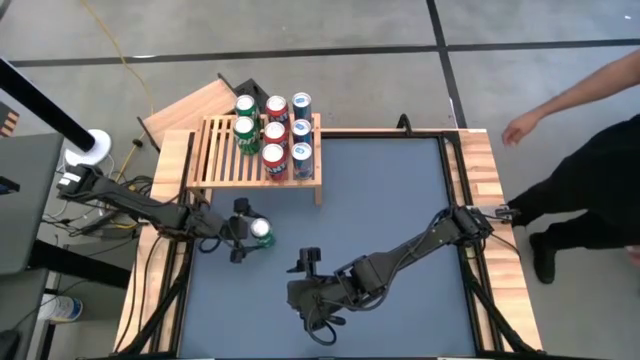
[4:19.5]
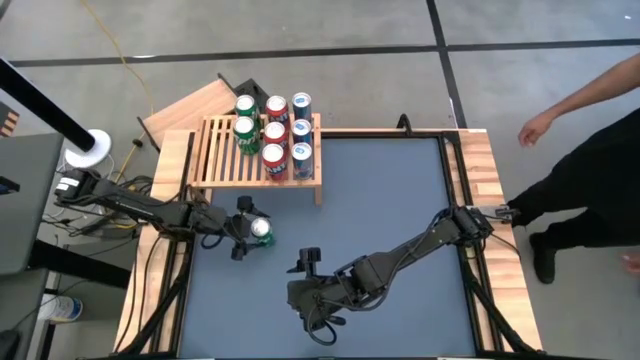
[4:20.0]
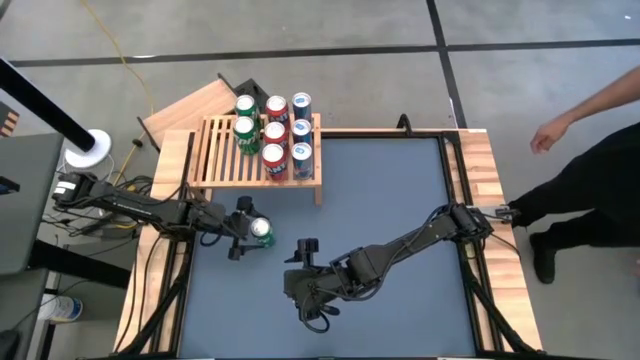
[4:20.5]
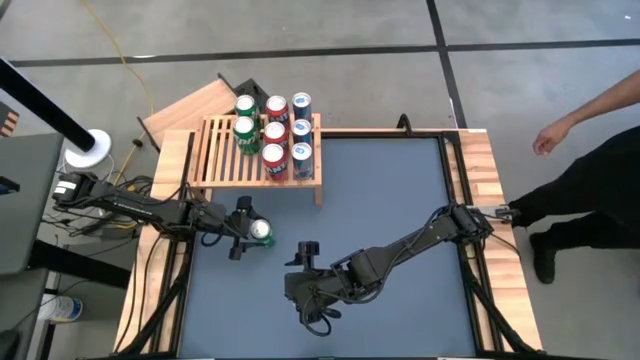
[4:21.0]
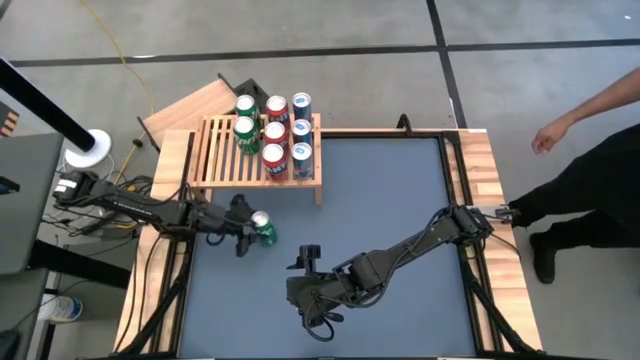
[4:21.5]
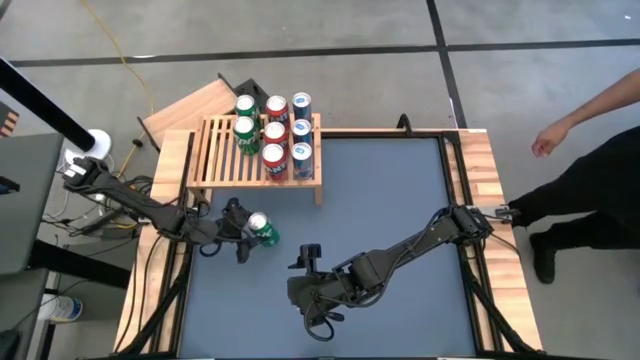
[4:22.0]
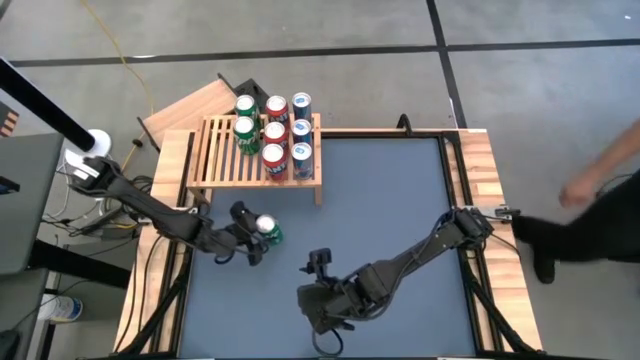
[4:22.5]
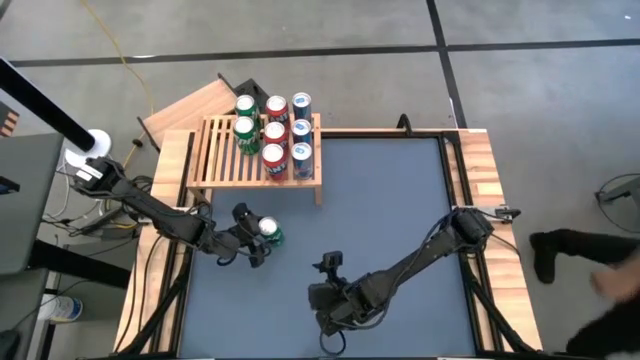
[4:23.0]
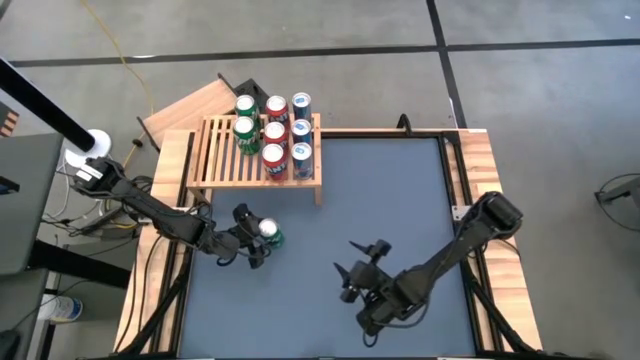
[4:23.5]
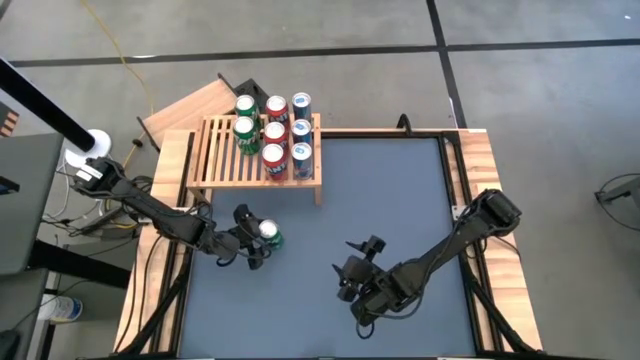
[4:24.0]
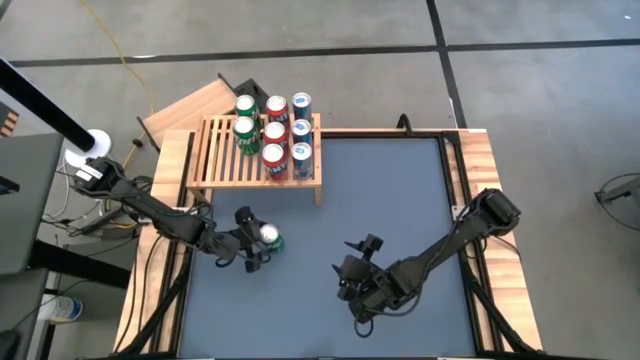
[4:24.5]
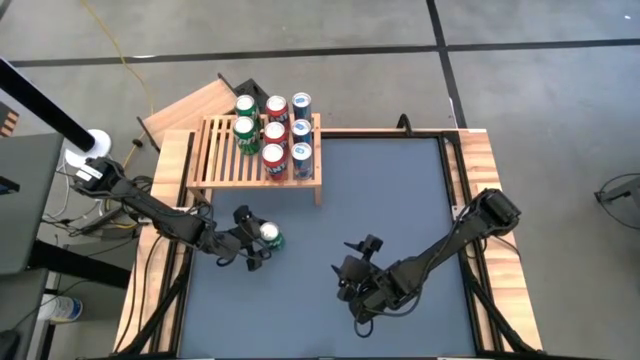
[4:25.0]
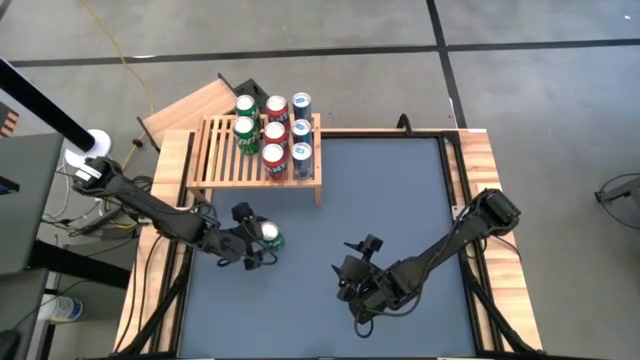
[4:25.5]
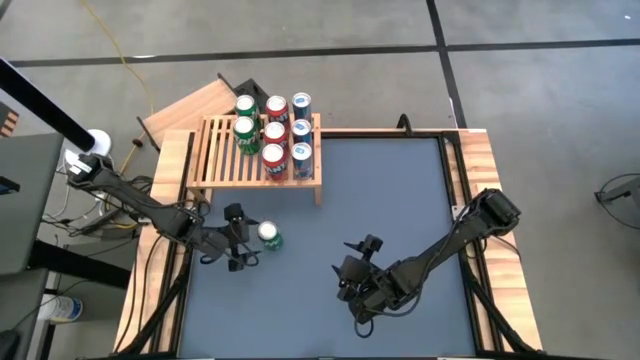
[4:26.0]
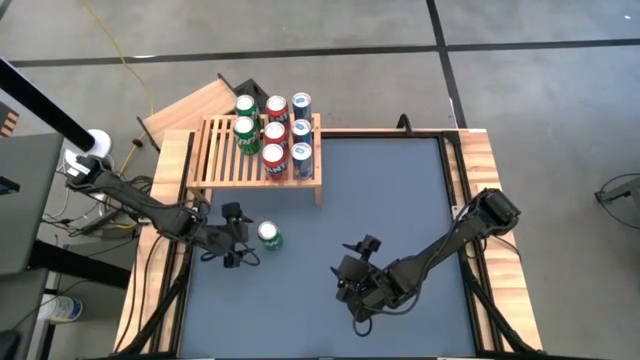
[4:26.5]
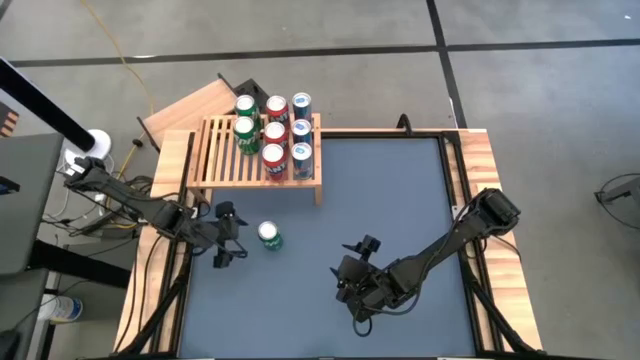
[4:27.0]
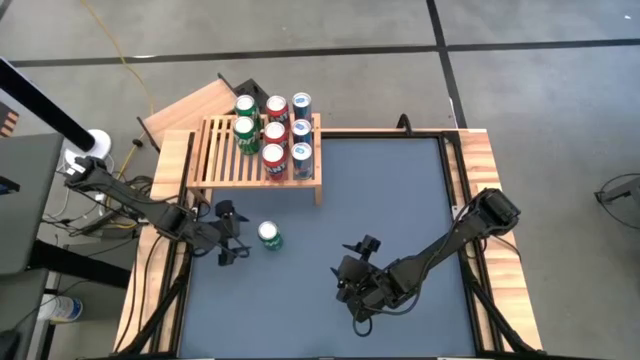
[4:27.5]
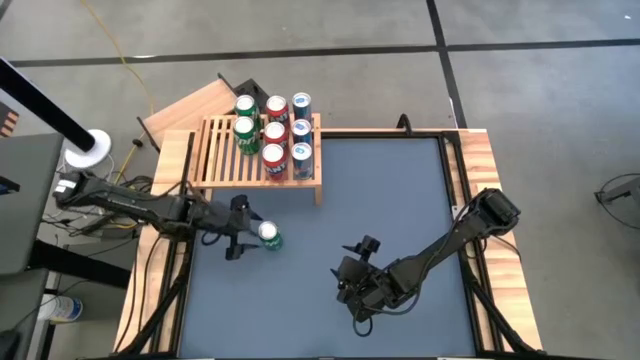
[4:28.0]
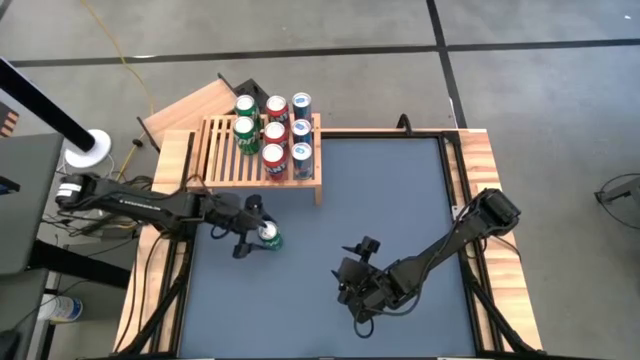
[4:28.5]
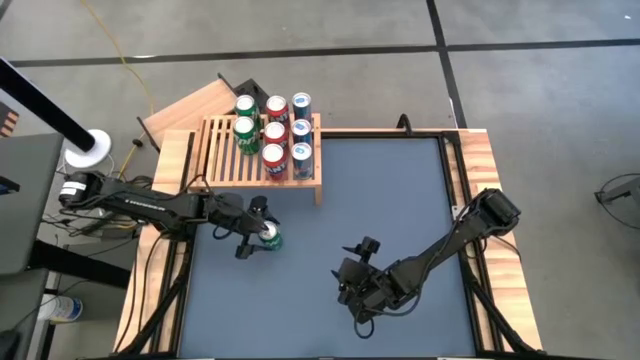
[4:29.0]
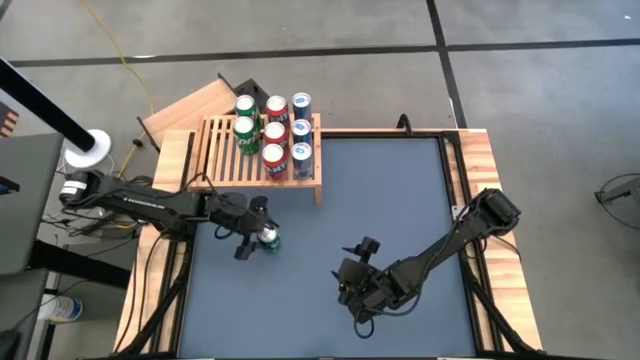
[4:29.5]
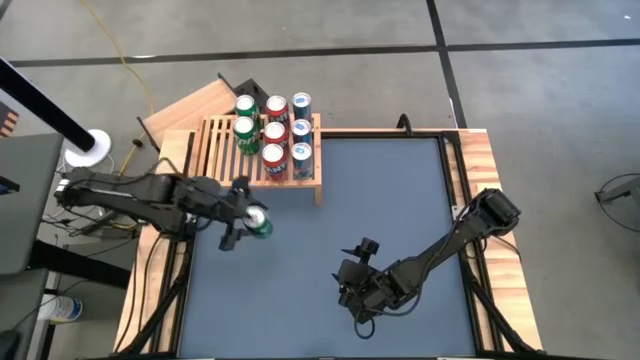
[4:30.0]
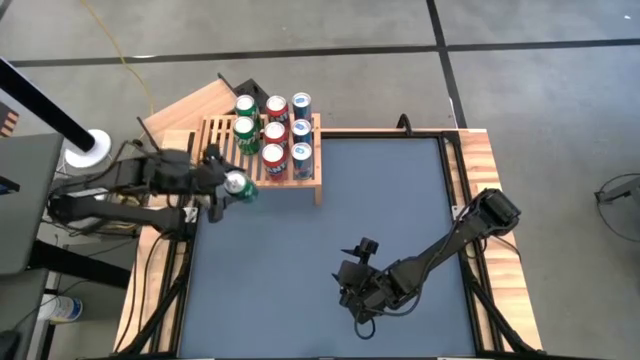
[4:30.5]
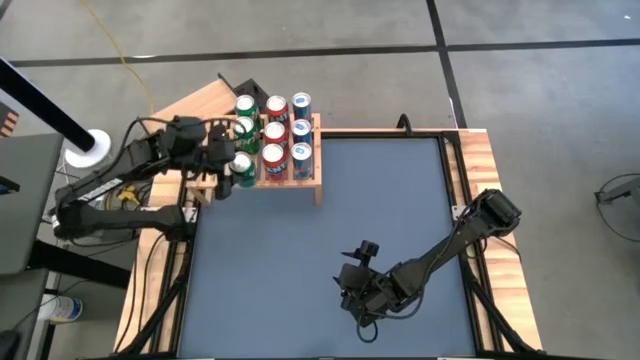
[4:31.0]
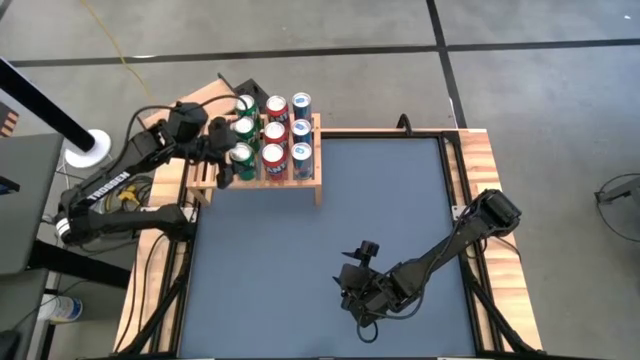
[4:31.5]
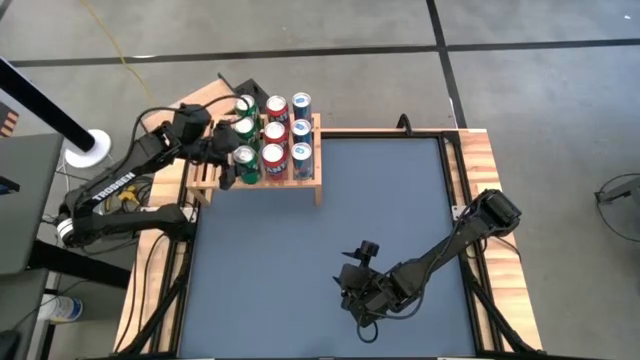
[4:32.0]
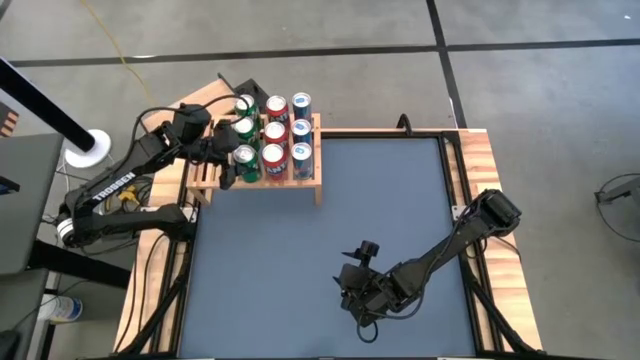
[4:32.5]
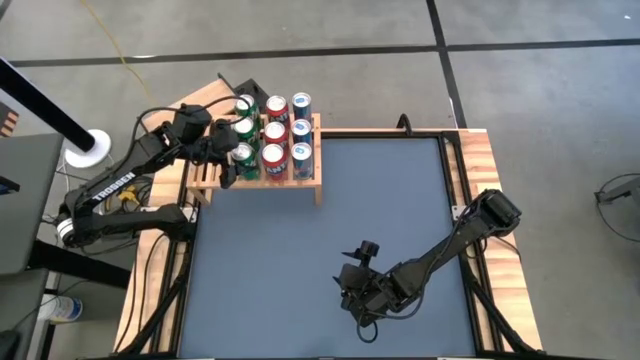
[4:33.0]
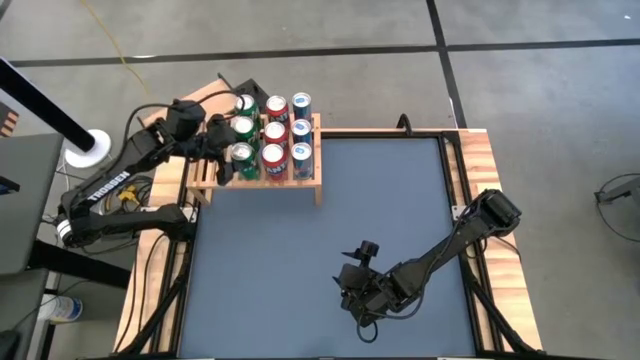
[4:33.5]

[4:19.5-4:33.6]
Task: Place canned beverage on shelf
Put the green soda can on the shelf aligned with the other green soda cans

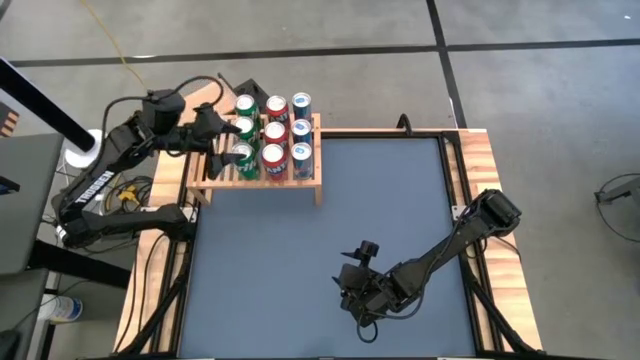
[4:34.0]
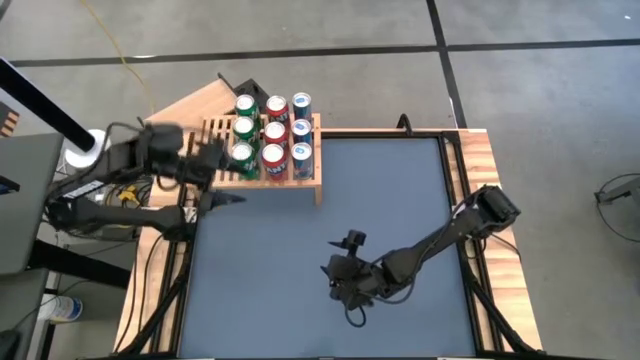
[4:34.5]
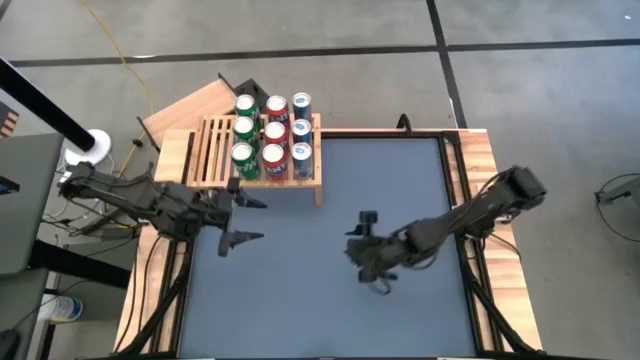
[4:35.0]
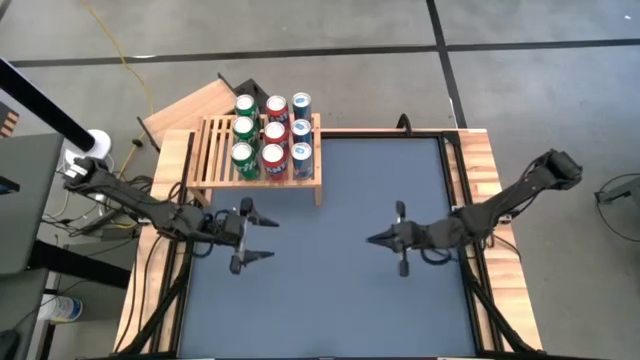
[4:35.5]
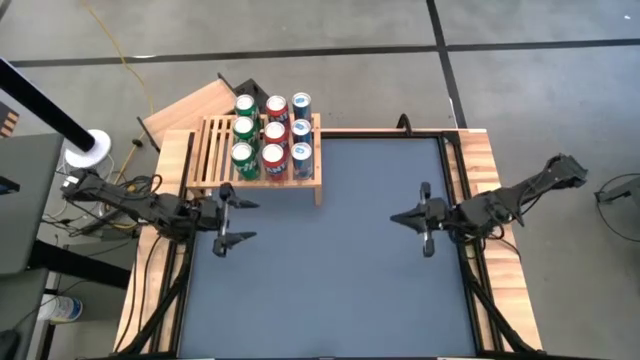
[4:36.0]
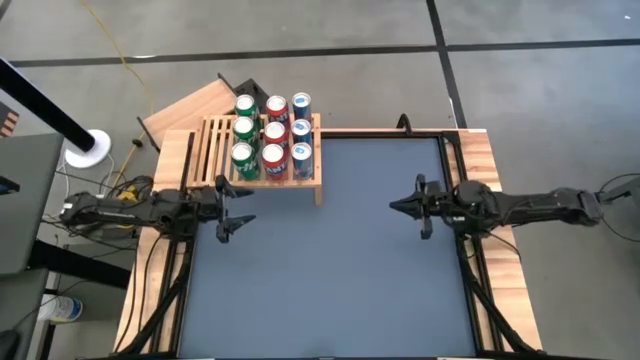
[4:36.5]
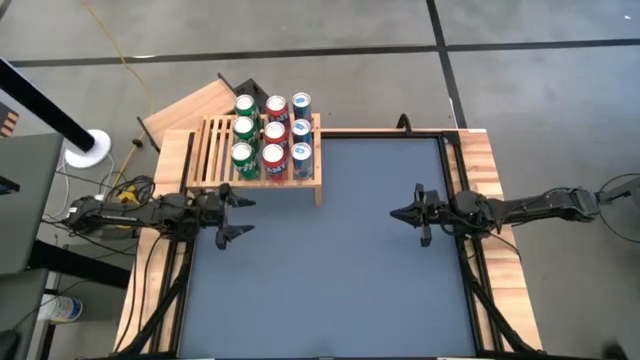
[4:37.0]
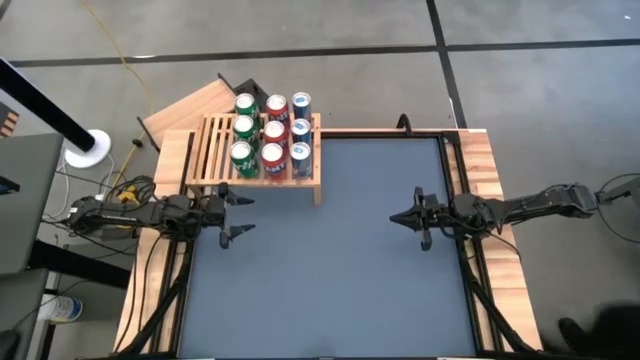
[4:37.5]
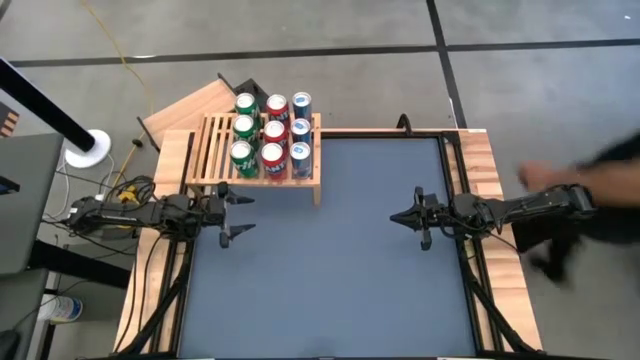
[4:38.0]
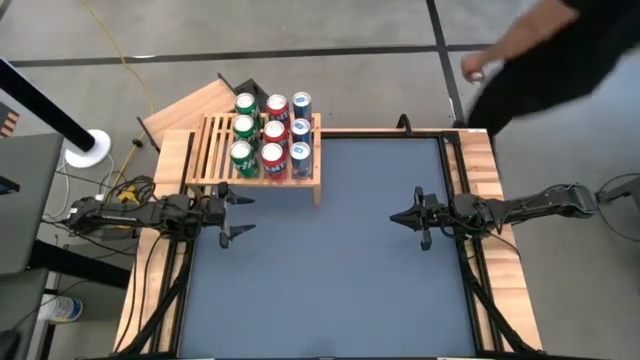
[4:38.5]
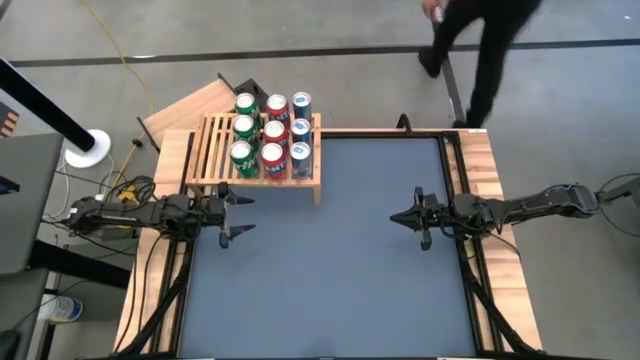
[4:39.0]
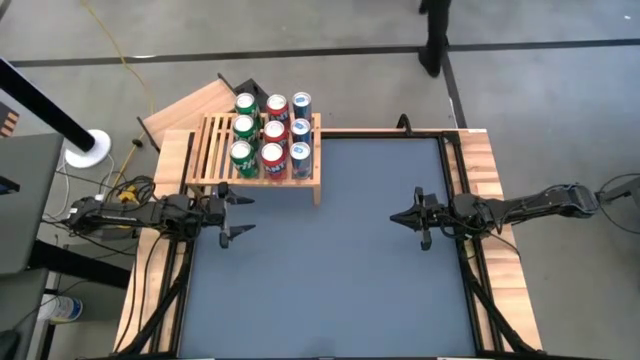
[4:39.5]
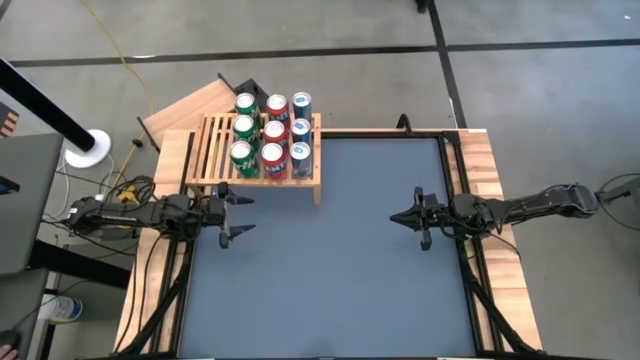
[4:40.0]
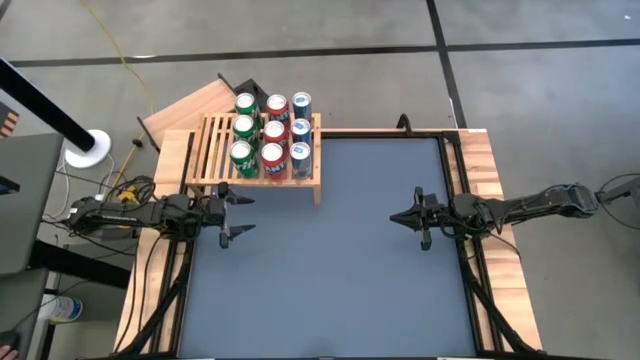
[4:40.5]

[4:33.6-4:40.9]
Return to Home Position
